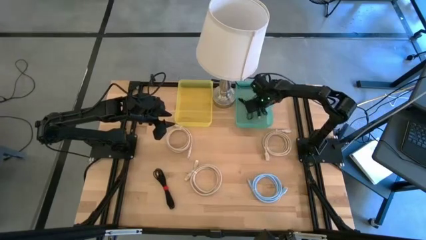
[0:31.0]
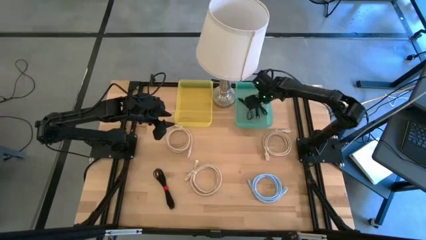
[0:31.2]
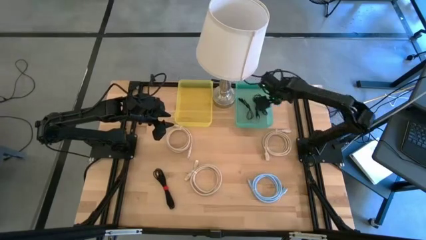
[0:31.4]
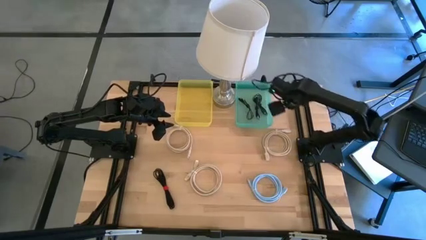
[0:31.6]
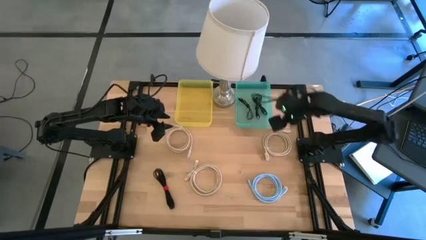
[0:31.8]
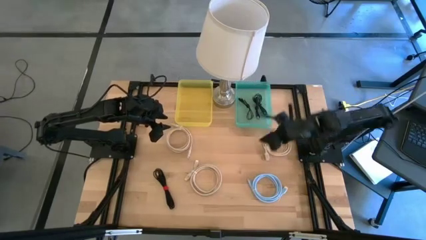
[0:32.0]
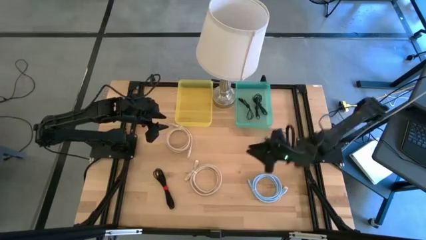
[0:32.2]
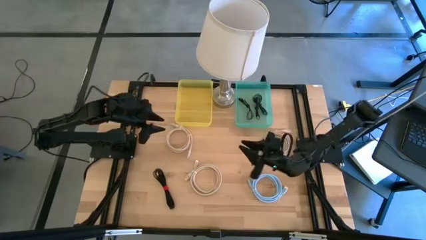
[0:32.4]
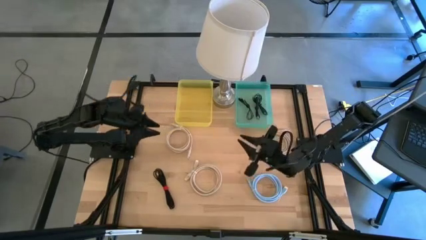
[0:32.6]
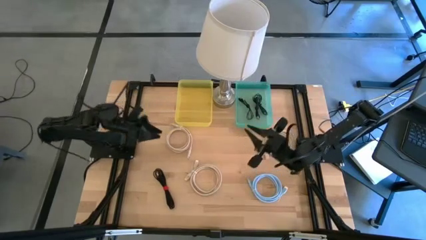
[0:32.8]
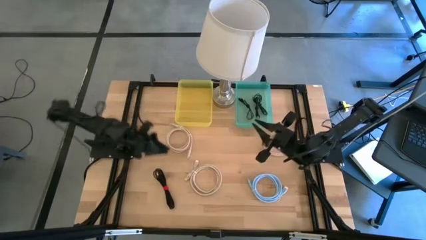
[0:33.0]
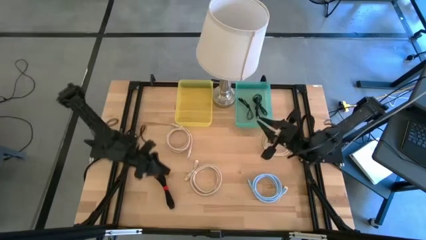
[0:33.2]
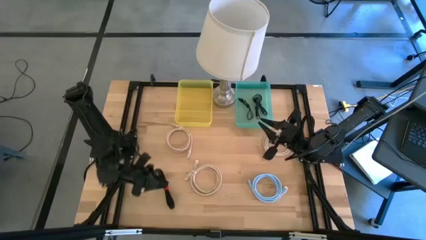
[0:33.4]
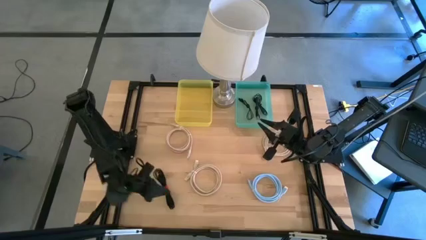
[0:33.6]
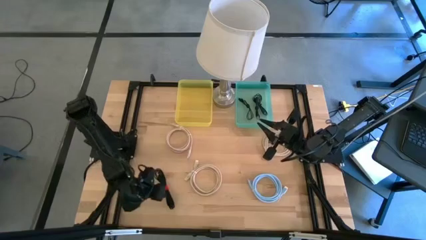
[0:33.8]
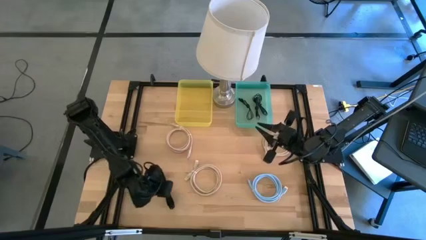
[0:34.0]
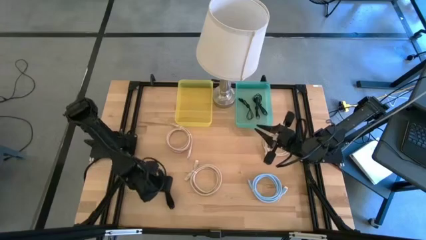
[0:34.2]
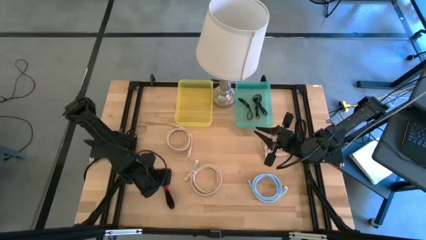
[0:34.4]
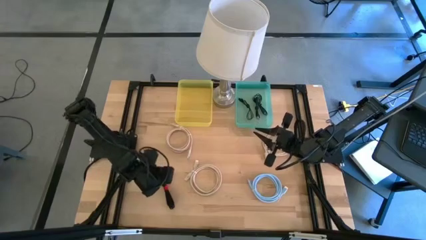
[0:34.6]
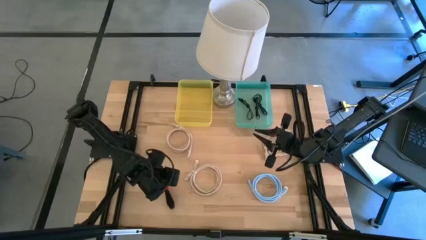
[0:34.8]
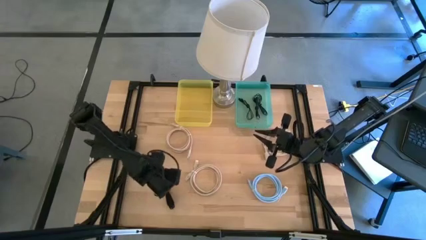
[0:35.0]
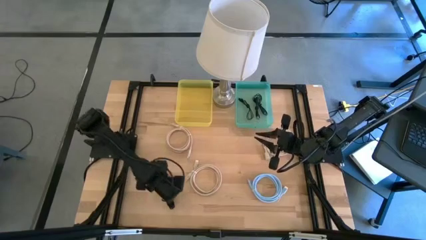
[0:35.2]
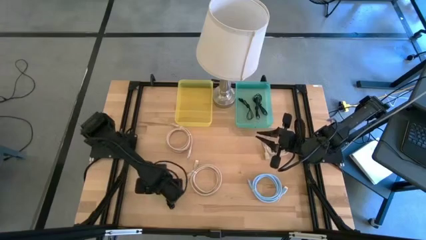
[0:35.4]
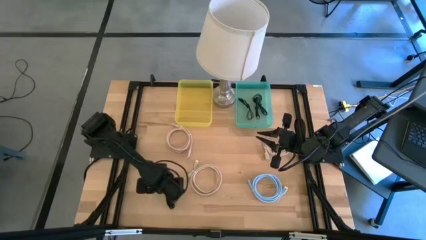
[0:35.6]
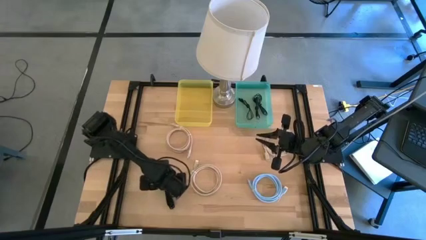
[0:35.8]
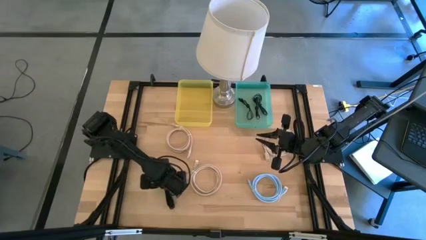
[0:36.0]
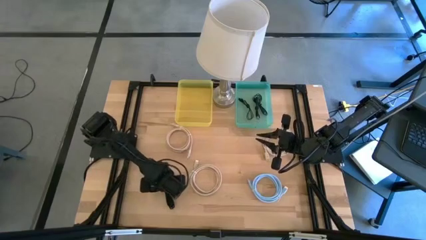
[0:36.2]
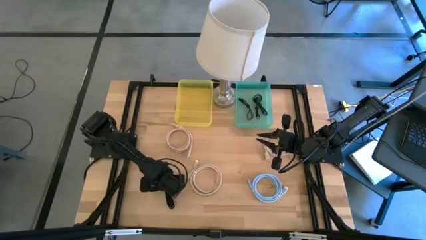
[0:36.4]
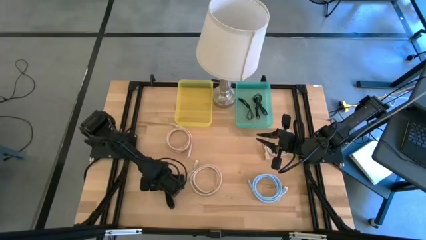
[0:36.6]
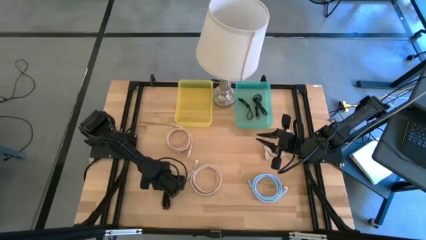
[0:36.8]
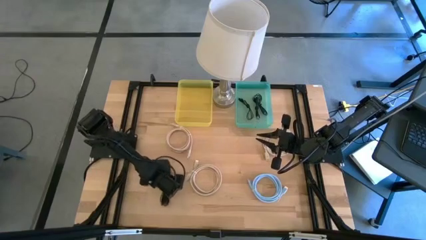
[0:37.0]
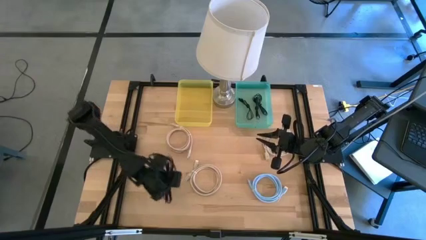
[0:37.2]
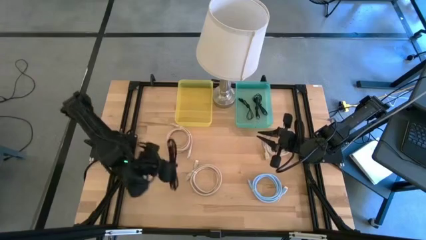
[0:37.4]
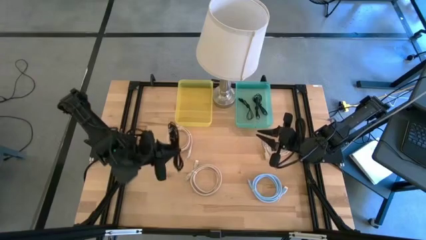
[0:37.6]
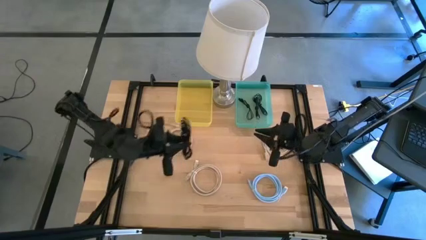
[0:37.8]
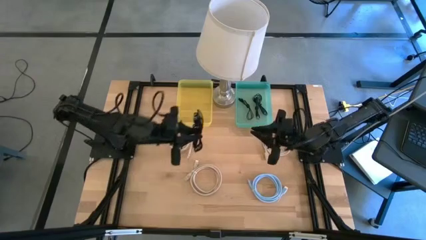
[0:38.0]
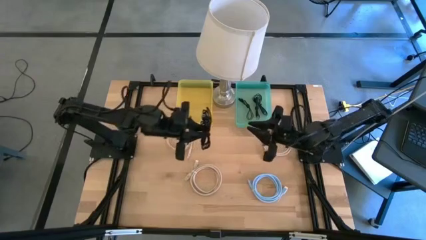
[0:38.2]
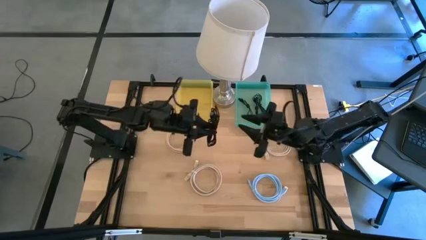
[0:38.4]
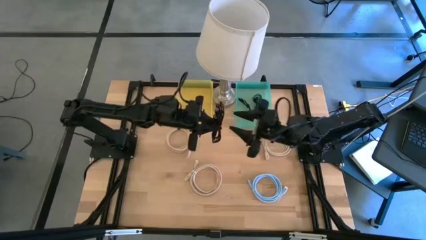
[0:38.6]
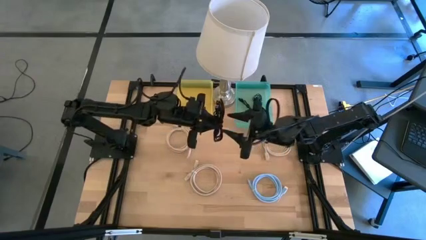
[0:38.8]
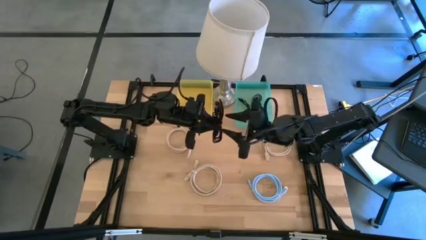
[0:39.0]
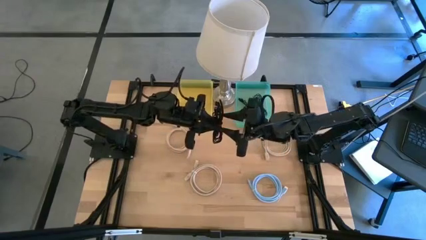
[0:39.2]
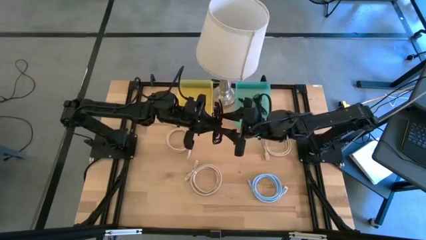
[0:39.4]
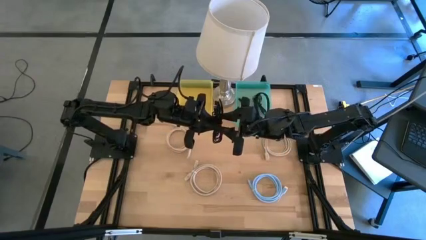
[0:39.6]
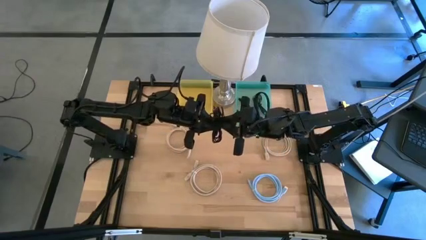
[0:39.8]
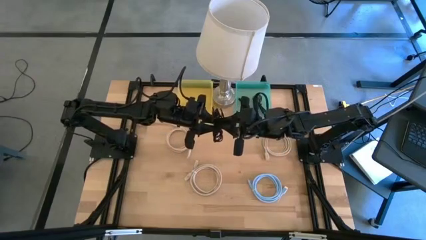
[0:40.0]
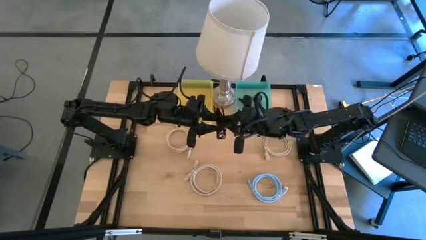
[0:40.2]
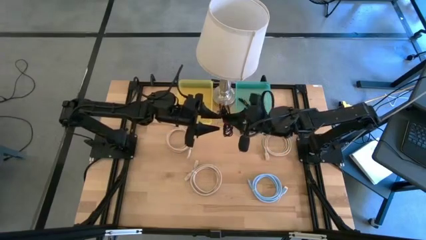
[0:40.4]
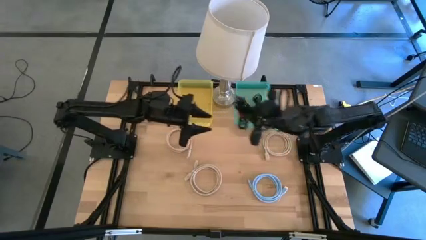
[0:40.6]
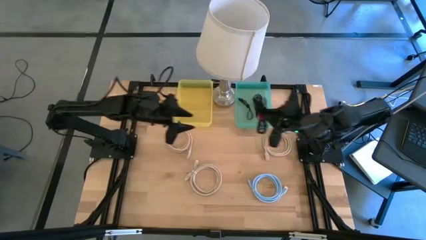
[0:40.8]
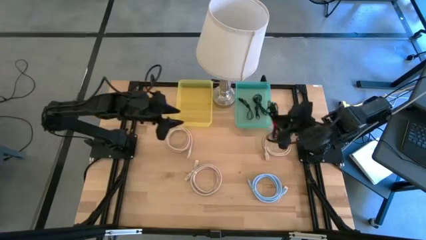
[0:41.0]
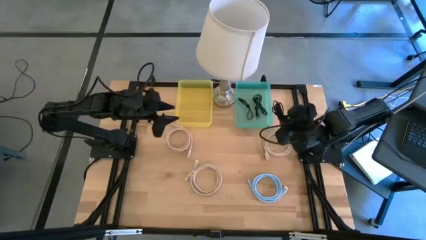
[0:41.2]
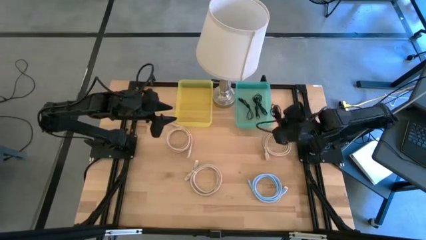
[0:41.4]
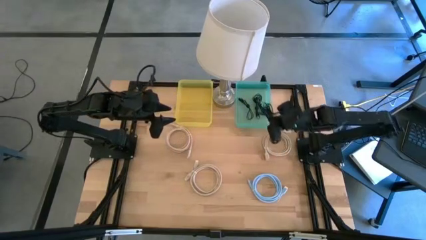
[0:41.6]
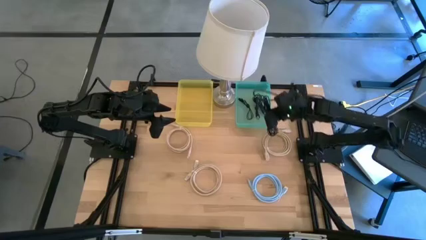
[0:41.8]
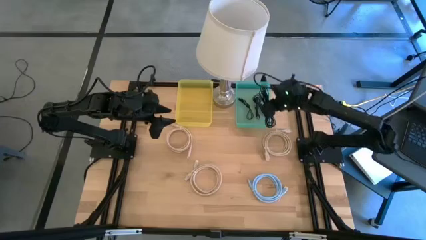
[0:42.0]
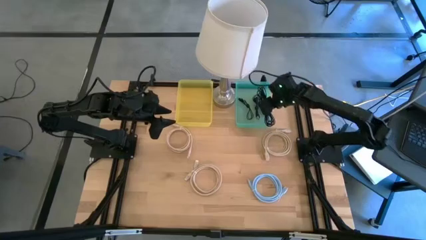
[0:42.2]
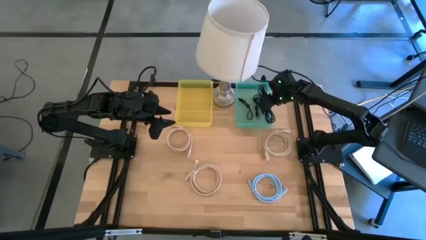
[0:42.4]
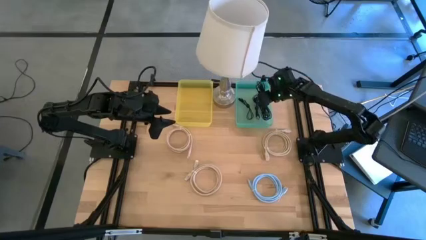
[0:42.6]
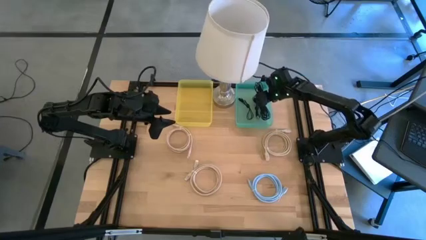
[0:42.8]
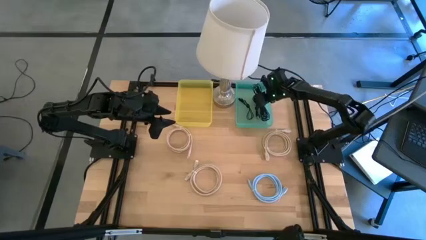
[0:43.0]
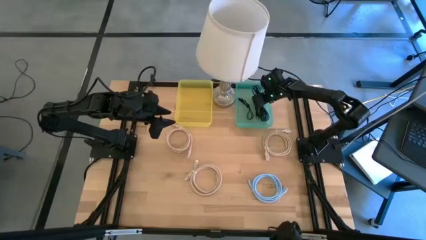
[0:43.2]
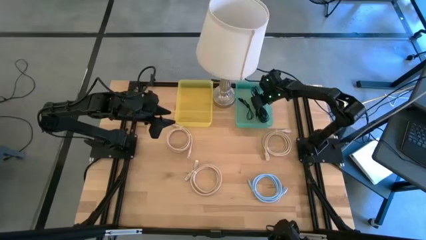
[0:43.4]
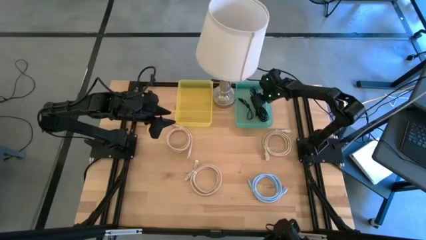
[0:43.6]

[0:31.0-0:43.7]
Put the black USB cable into the blue bin

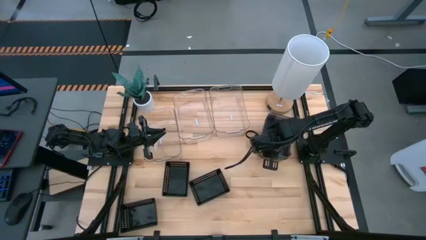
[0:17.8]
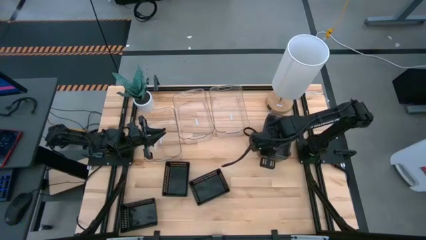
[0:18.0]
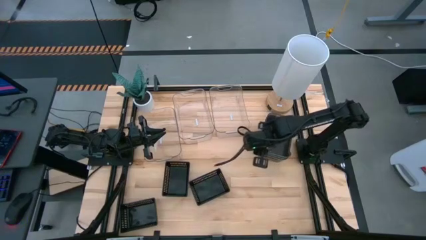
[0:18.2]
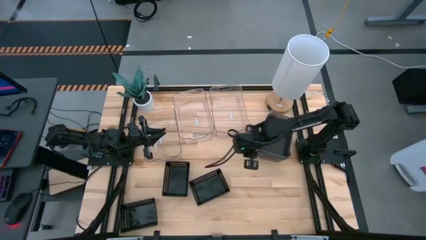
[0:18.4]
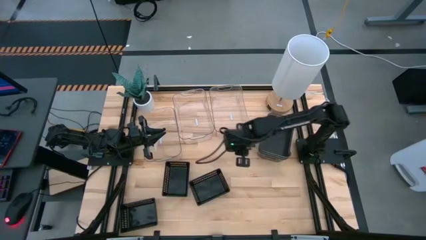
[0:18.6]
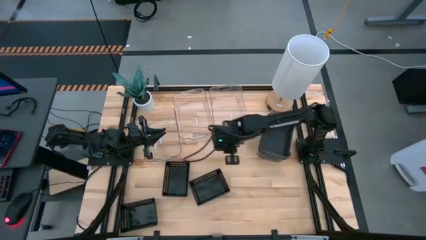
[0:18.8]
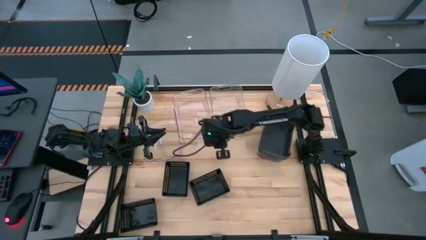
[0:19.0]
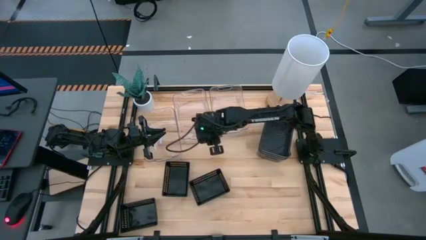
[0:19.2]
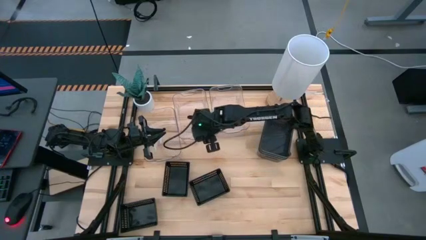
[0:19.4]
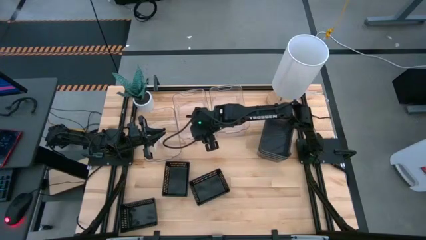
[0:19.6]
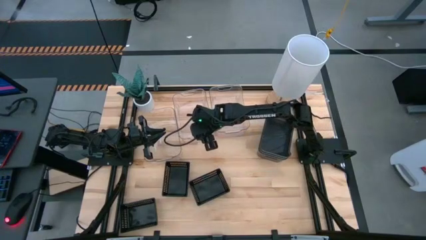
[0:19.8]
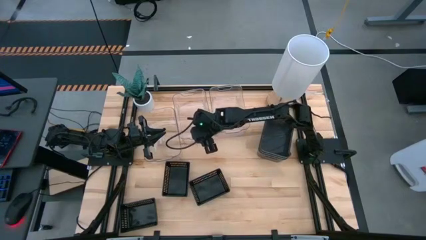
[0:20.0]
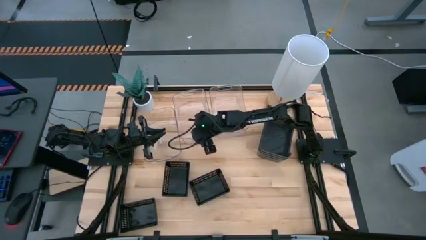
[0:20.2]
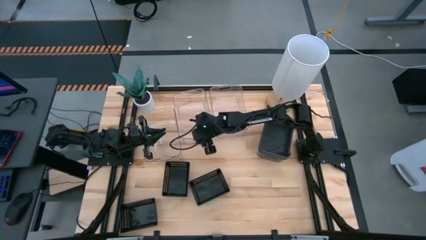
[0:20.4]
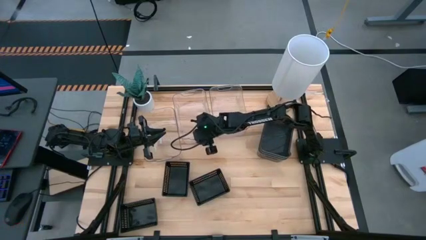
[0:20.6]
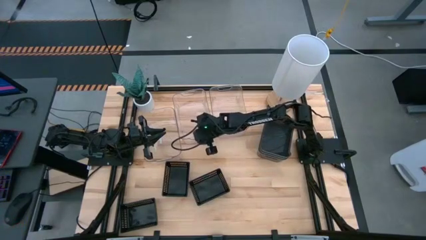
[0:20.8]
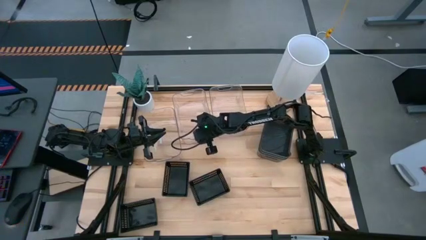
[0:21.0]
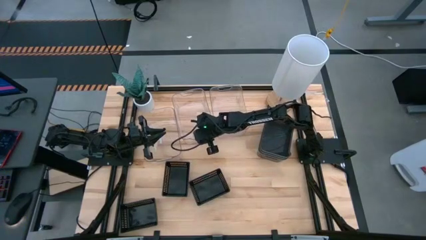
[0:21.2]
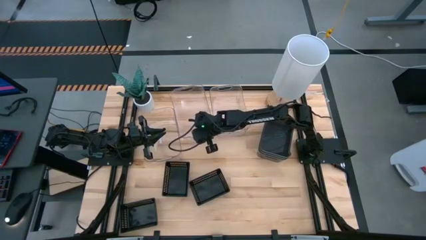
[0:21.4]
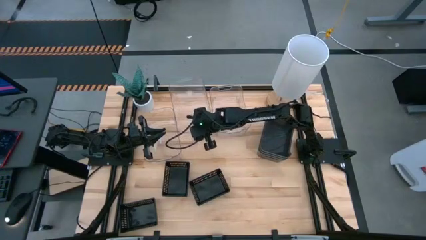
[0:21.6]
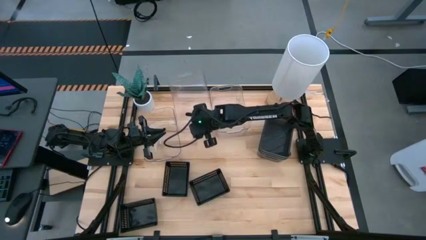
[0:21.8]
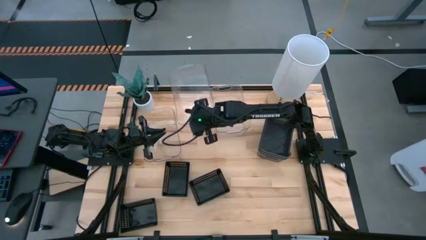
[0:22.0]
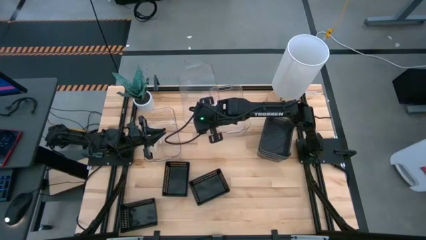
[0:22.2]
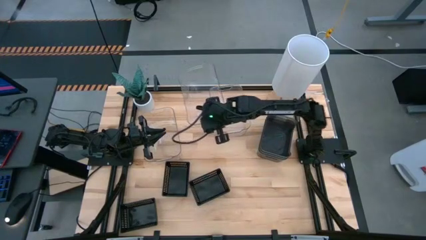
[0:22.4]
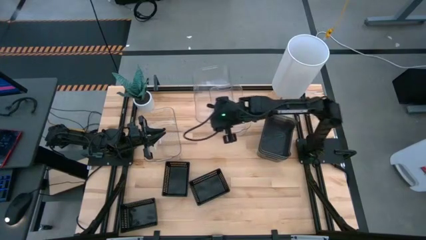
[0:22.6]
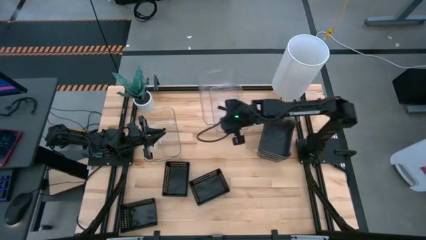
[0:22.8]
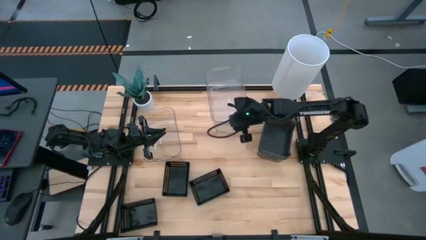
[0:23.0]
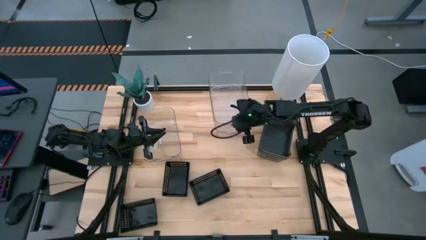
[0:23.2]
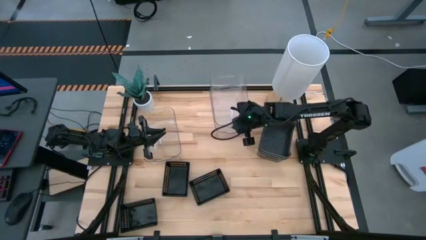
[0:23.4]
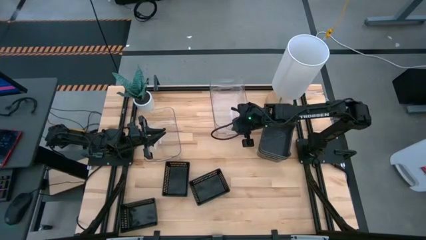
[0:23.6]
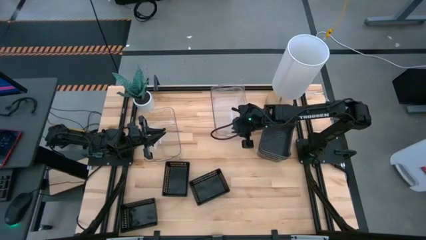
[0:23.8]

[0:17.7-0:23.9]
Stack the middle transparent bin on the right transparent bin
